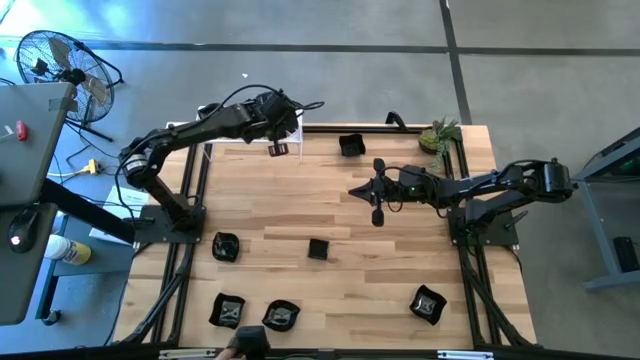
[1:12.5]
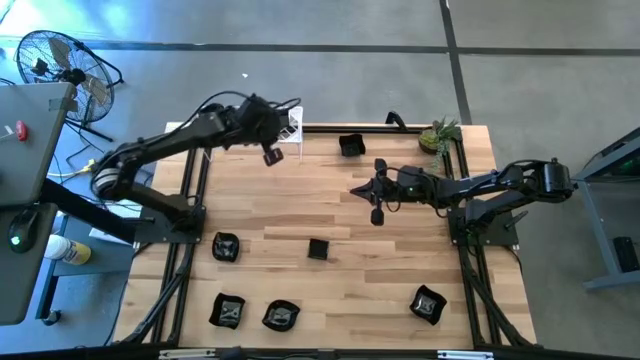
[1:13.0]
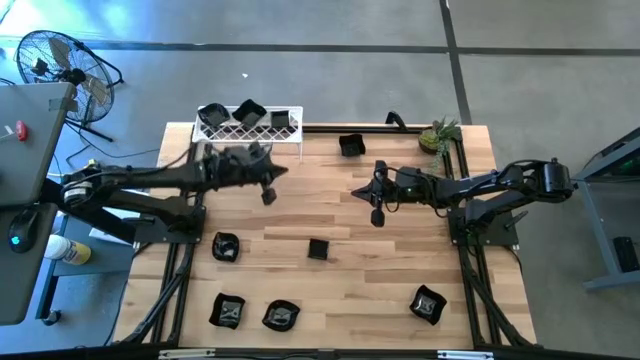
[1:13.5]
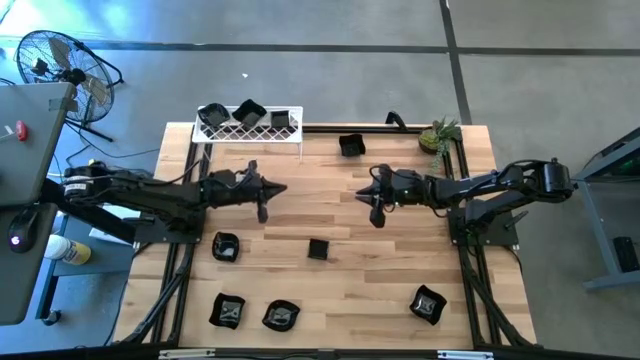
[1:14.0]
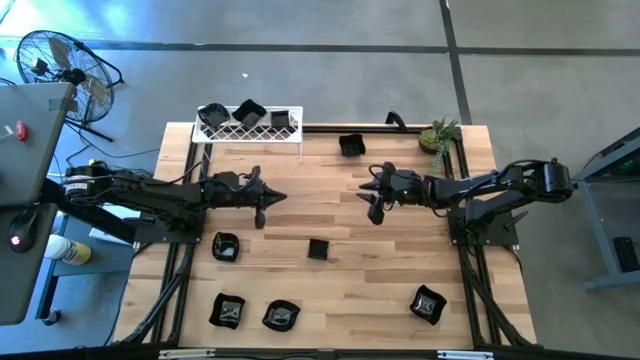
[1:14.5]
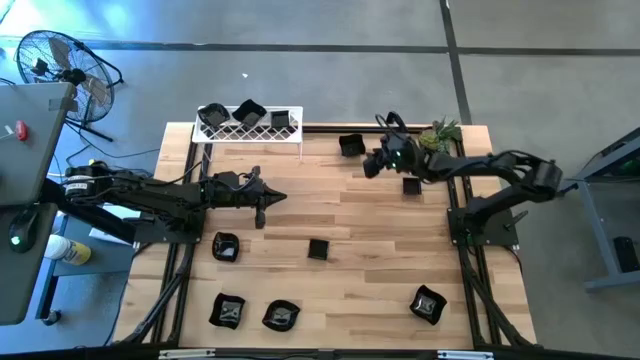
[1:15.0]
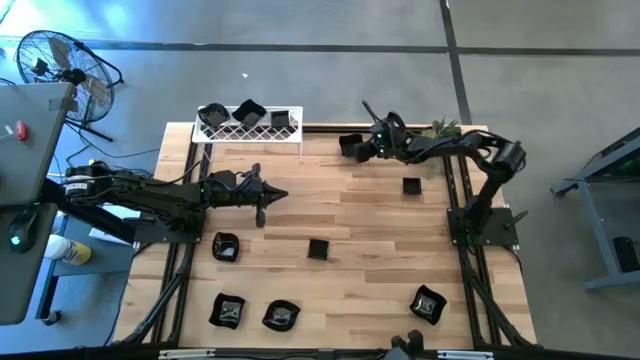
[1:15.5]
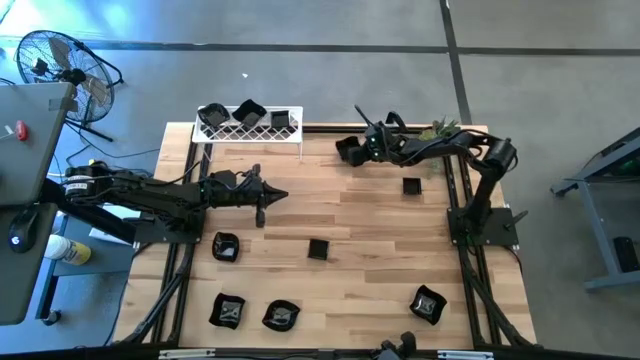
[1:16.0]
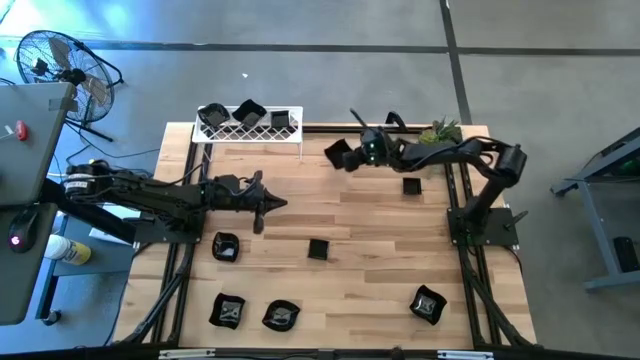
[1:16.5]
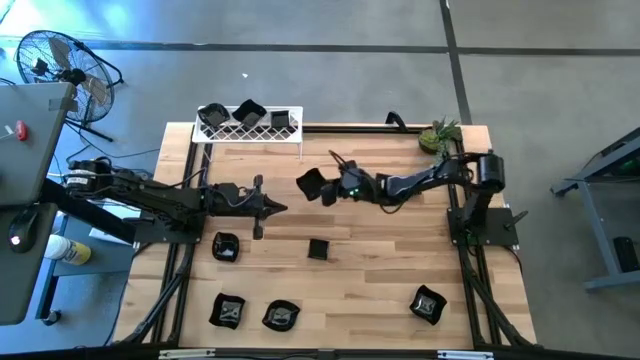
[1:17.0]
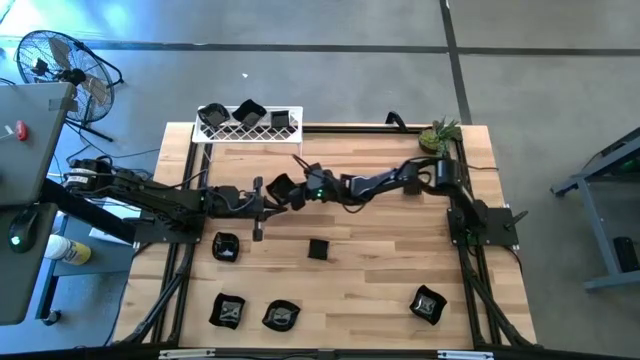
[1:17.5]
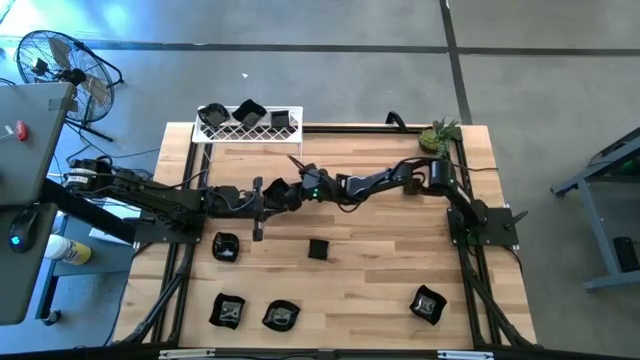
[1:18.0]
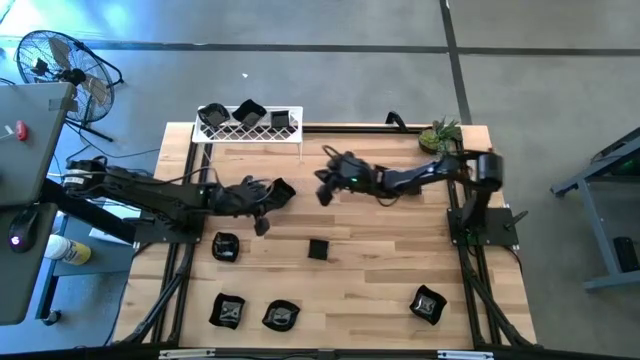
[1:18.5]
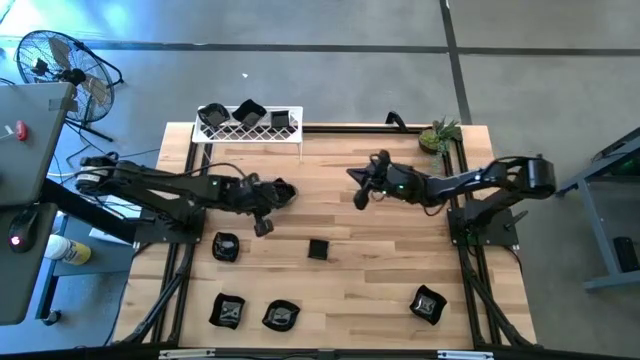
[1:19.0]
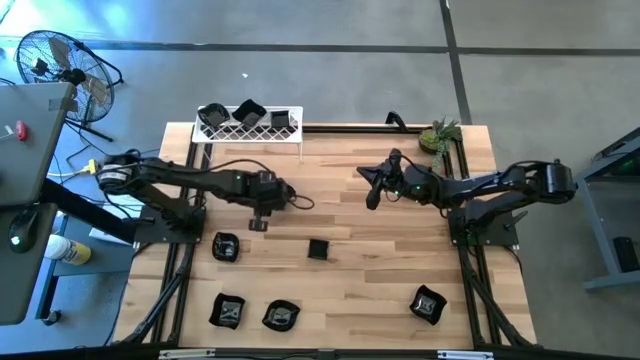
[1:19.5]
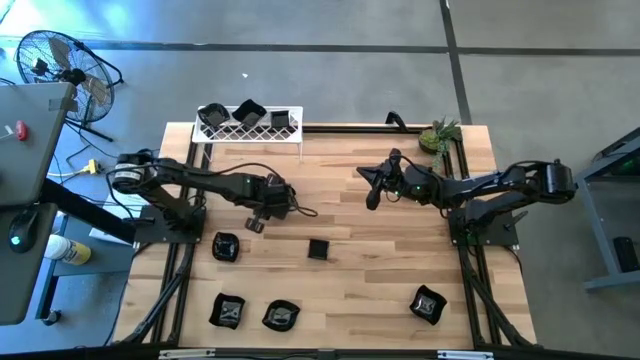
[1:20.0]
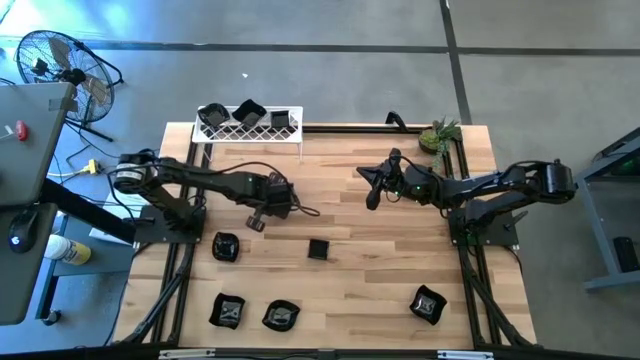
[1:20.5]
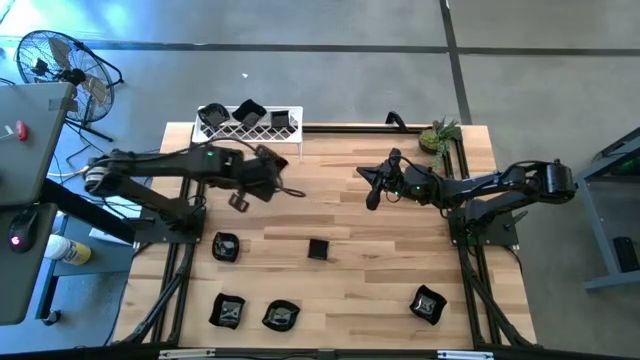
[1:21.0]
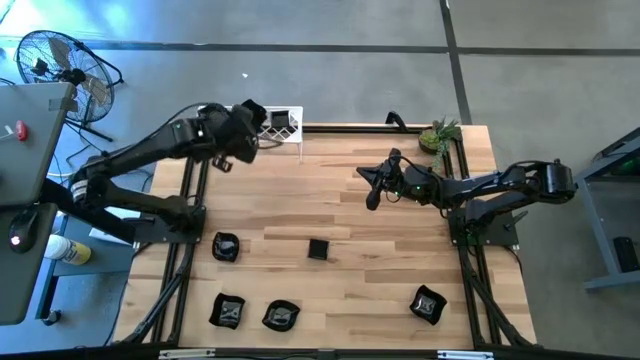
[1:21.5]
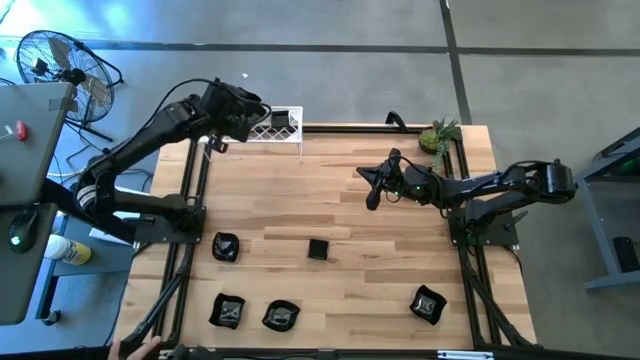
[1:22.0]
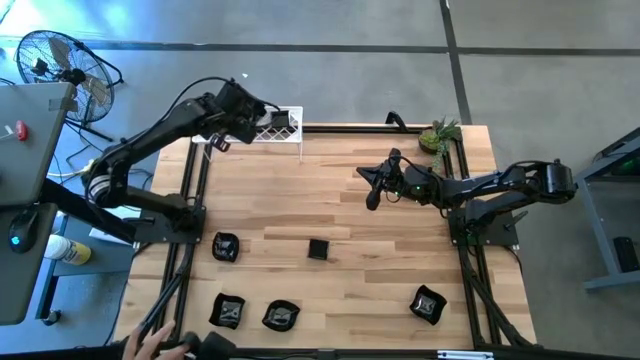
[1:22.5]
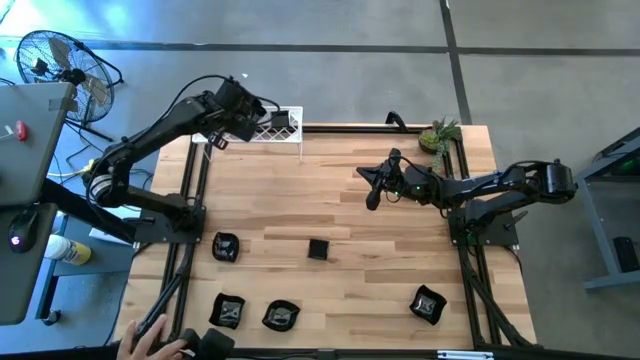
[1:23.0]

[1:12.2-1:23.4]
Task: Pick & Place Mini shaped plates
Stack the black distorted square plate on top of the black distorted square plate on the shelf

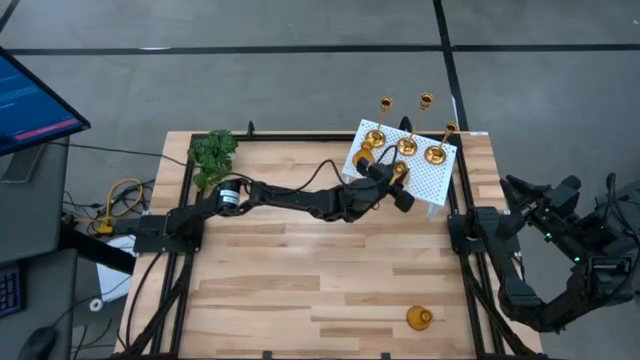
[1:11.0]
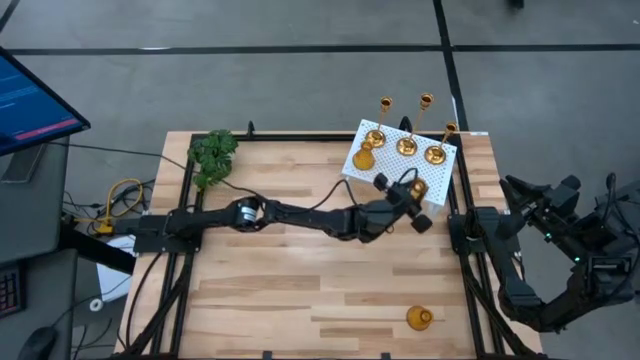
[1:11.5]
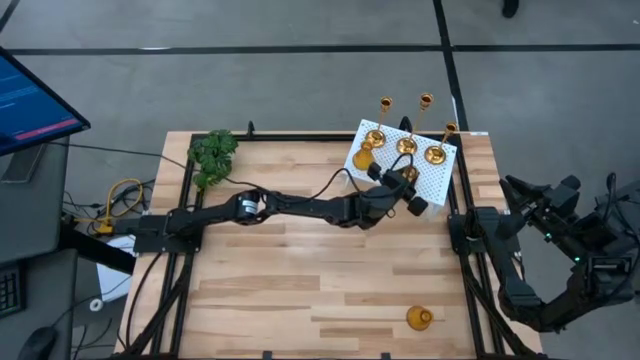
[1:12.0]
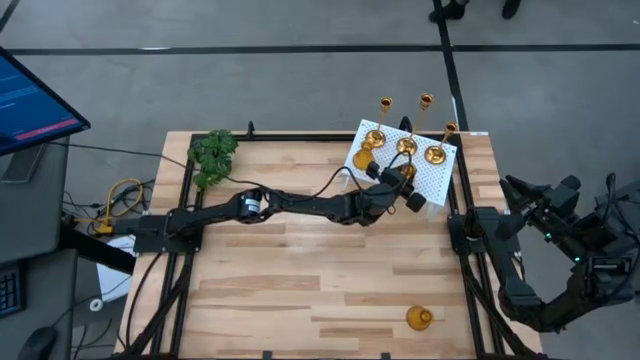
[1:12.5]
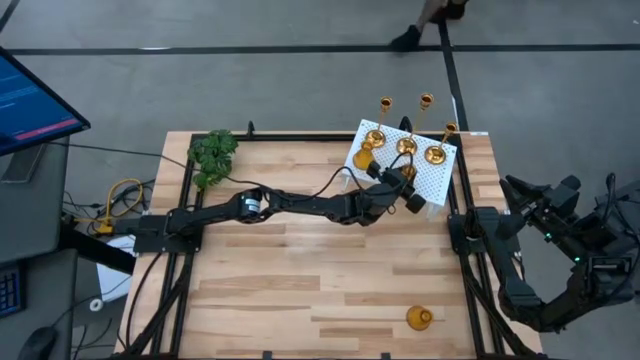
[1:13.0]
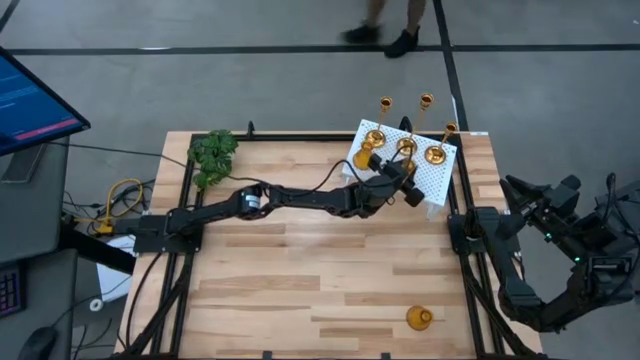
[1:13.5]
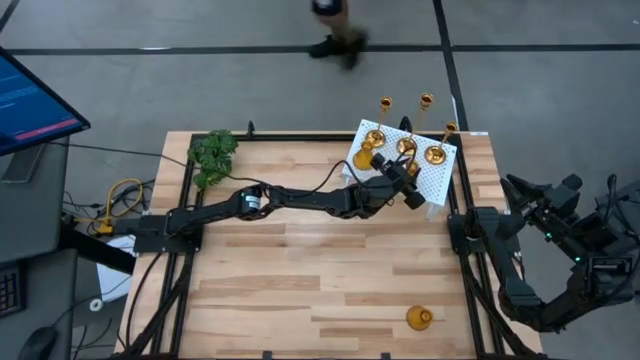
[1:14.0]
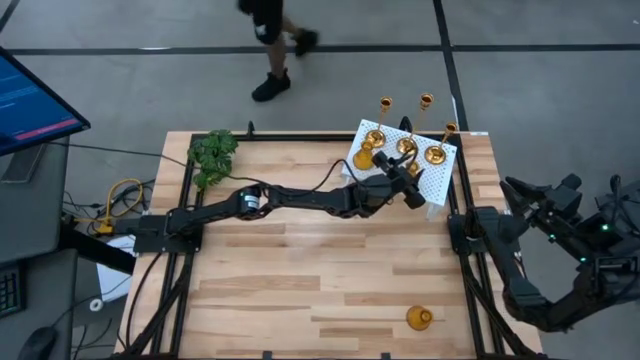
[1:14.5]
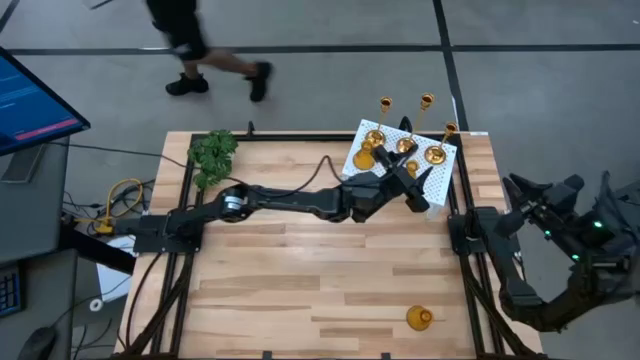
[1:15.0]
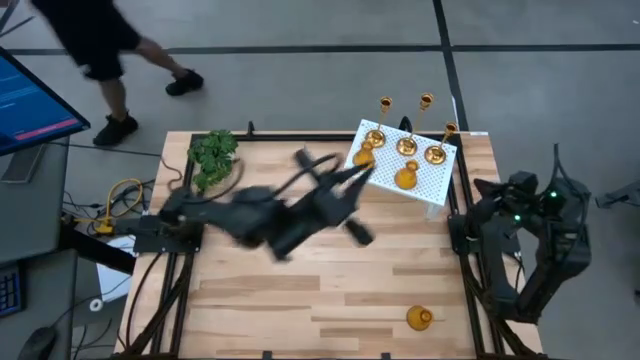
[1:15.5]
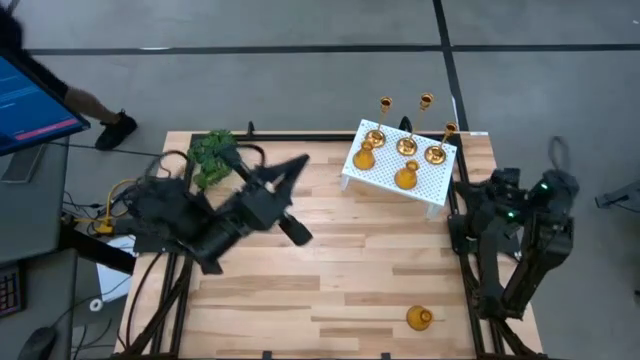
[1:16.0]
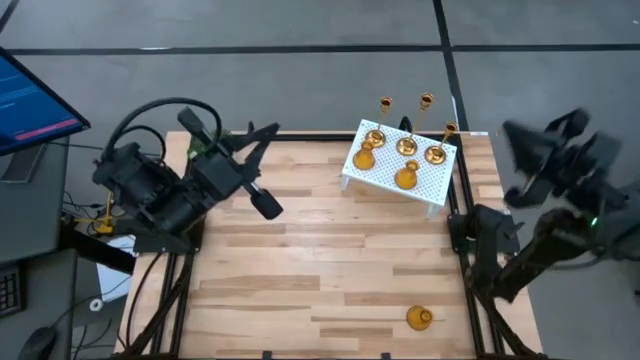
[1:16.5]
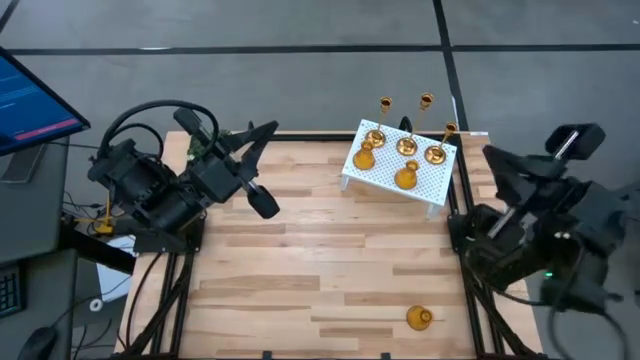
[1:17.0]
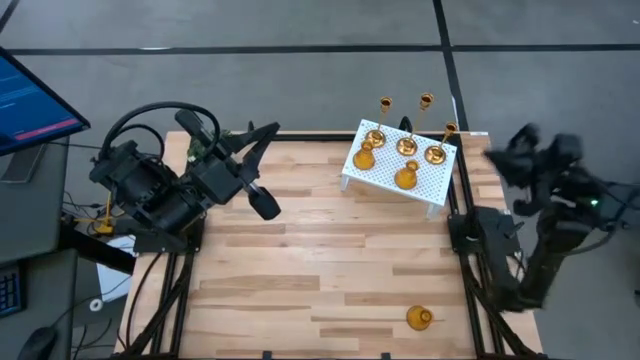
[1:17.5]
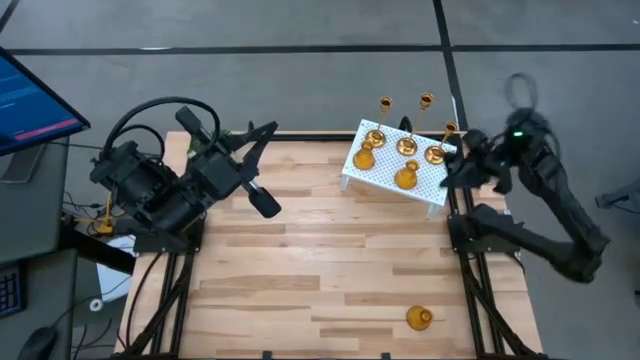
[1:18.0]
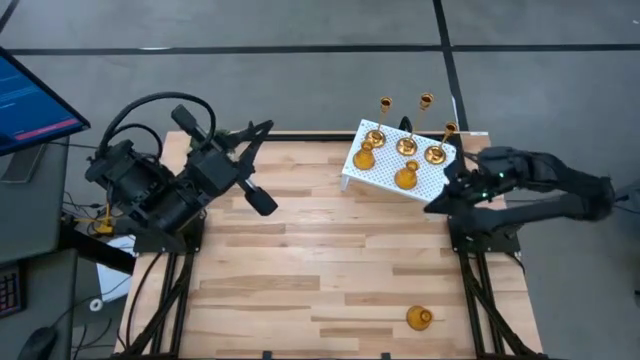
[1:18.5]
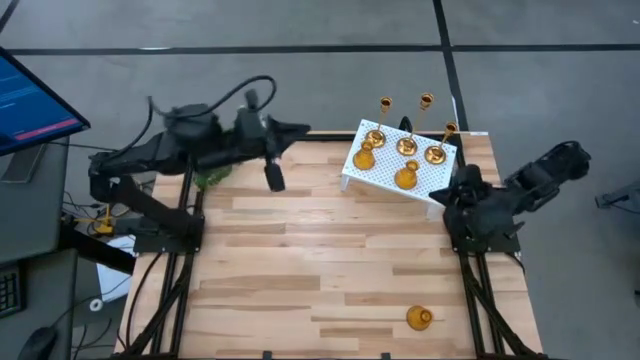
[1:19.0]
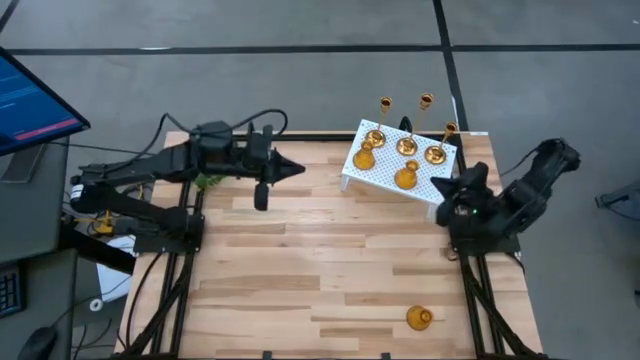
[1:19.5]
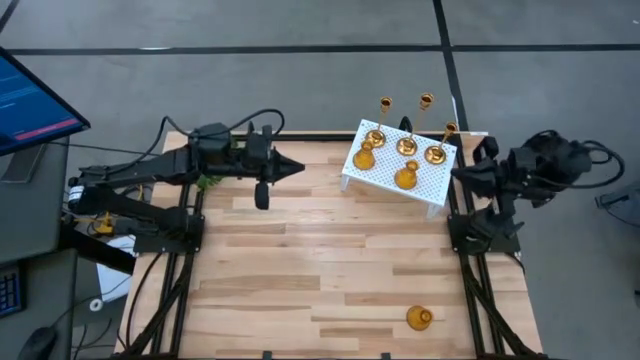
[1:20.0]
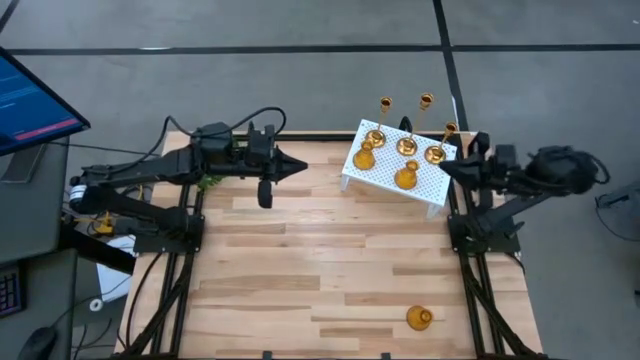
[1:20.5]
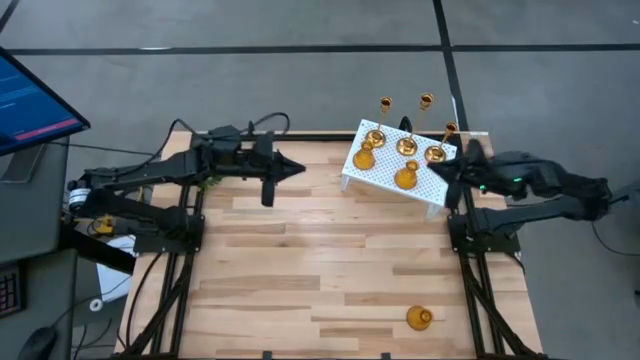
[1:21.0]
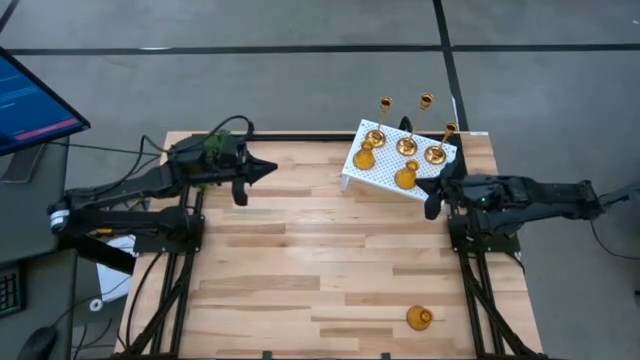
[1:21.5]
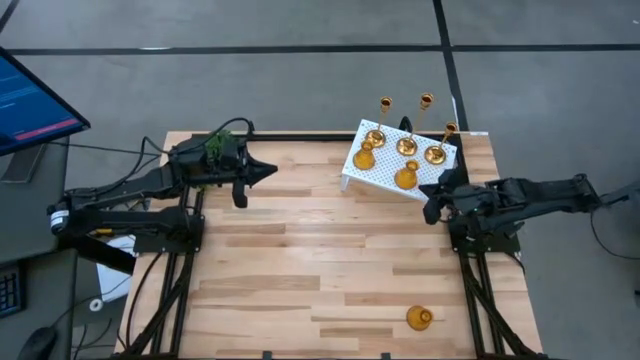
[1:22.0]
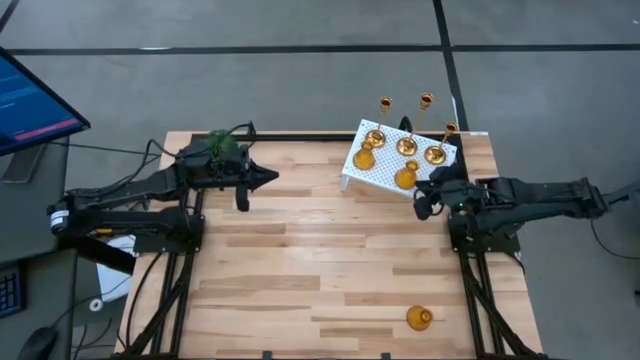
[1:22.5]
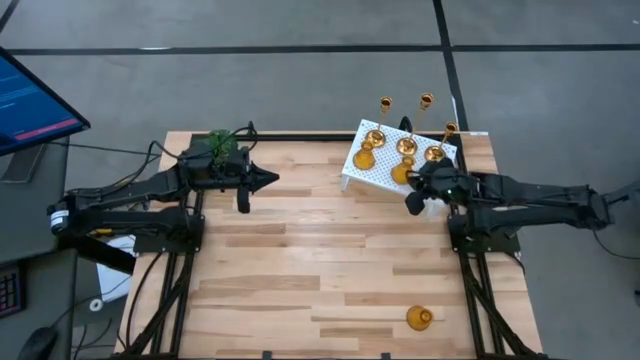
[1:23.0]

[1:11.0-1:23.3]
Task: Pick & Place candle stick holders
Put the top yellow candle holder on the shelf aligned with the other yellow candle holder
